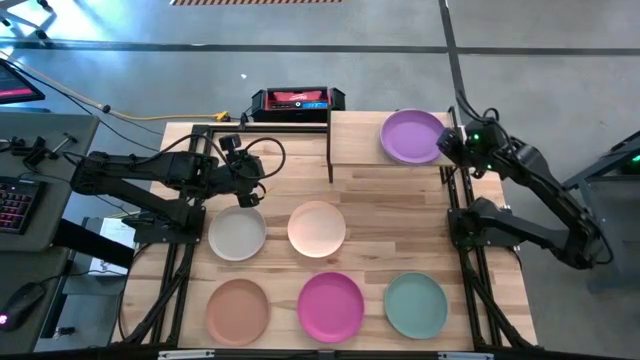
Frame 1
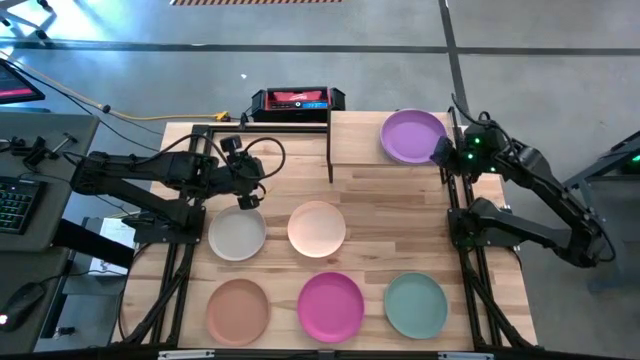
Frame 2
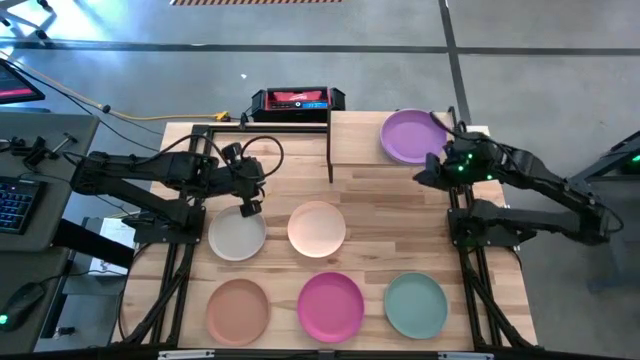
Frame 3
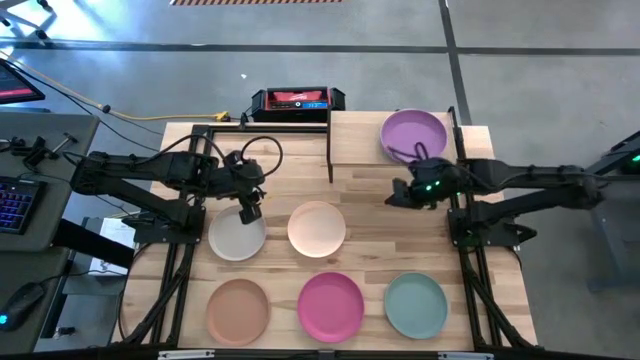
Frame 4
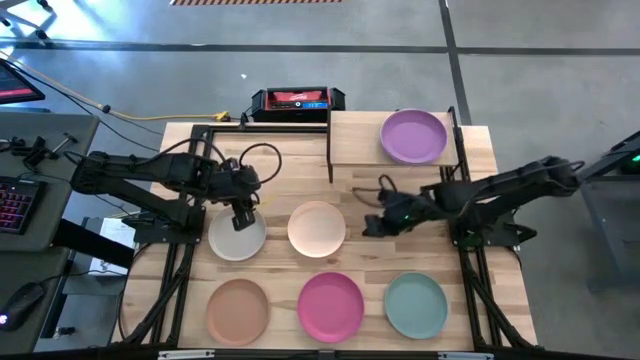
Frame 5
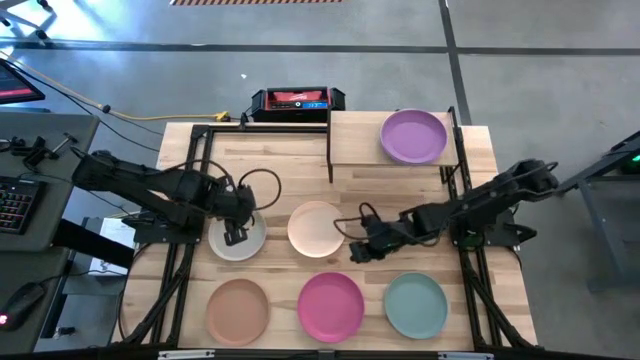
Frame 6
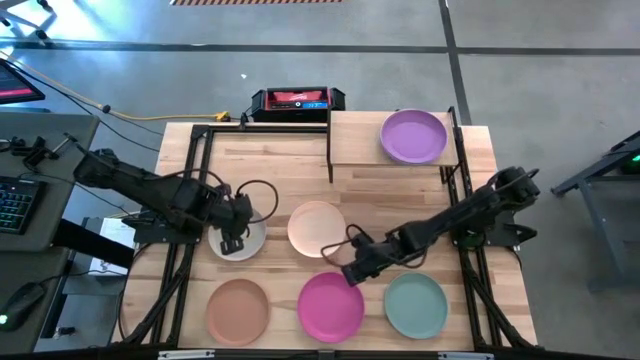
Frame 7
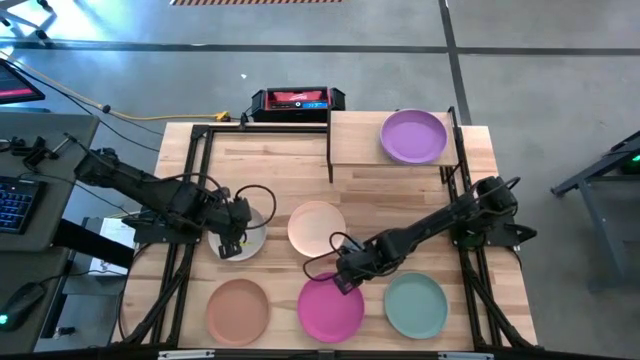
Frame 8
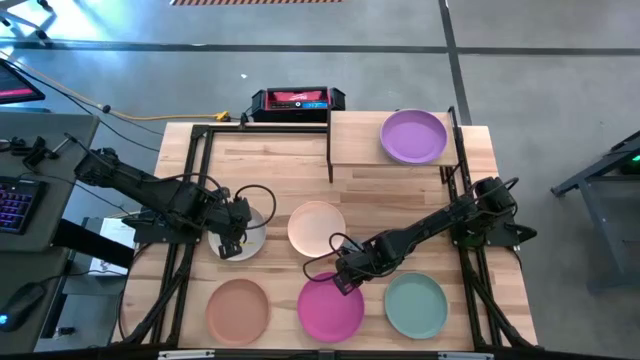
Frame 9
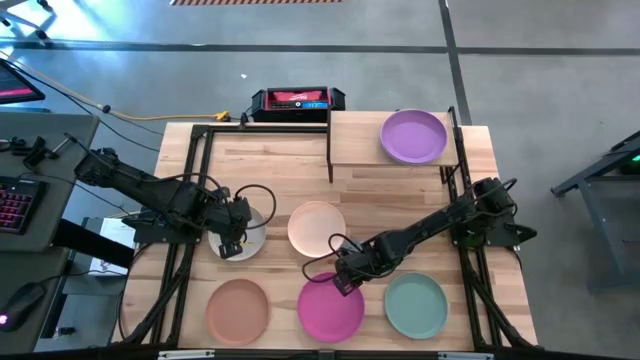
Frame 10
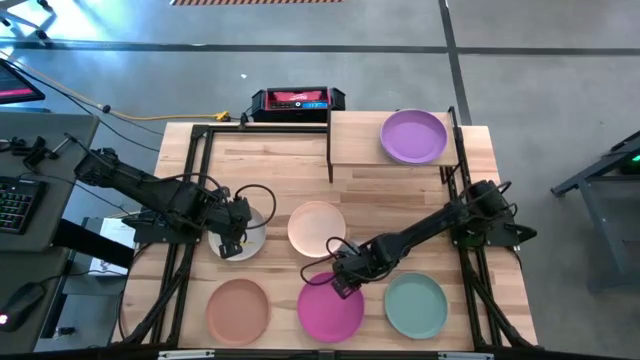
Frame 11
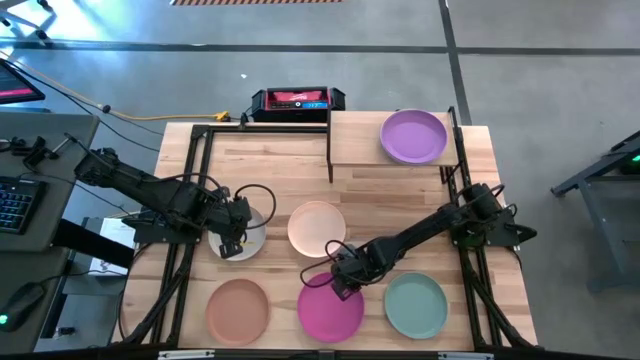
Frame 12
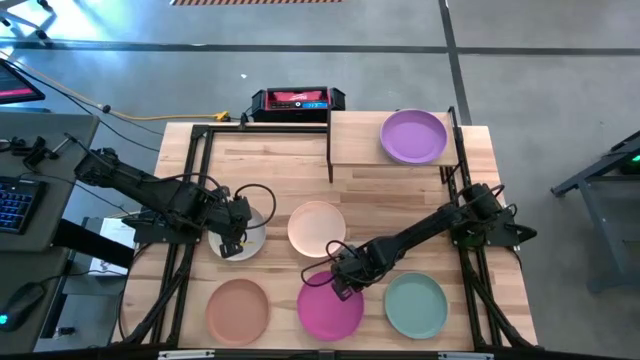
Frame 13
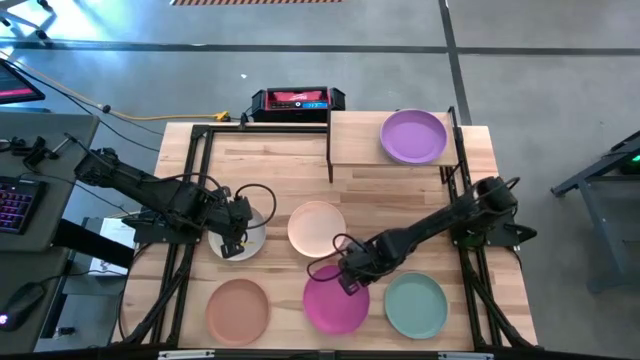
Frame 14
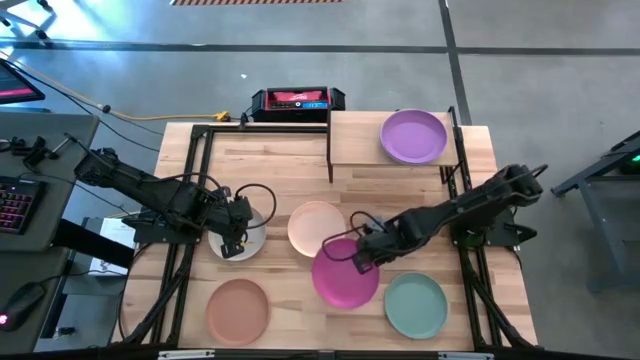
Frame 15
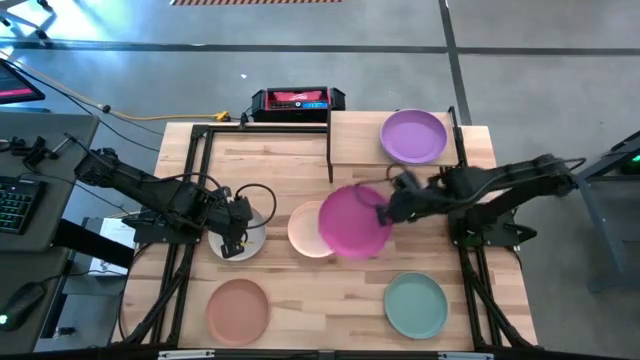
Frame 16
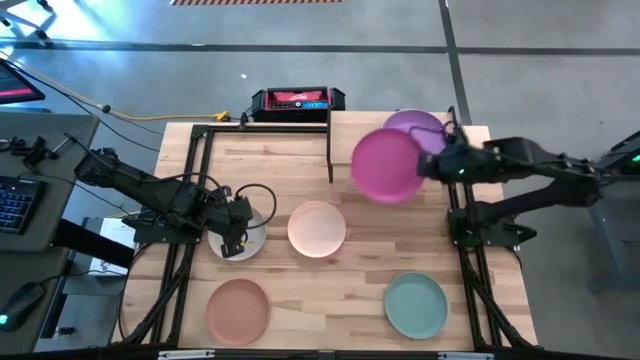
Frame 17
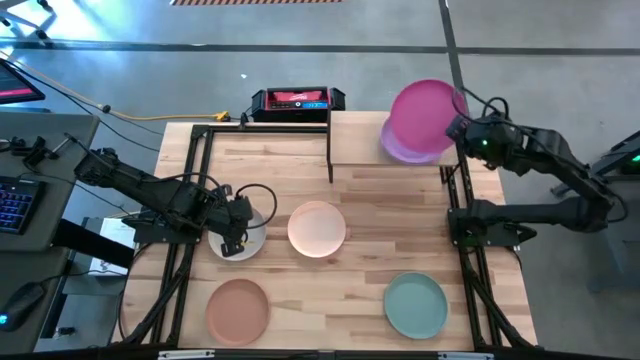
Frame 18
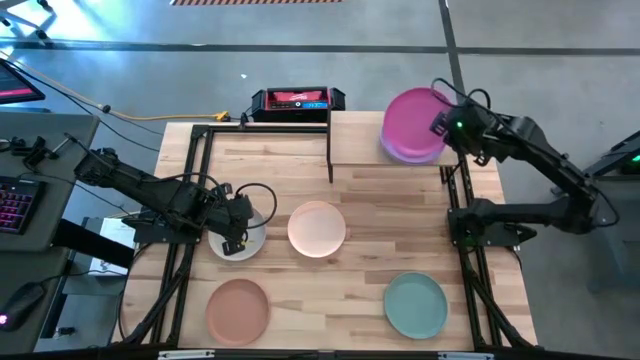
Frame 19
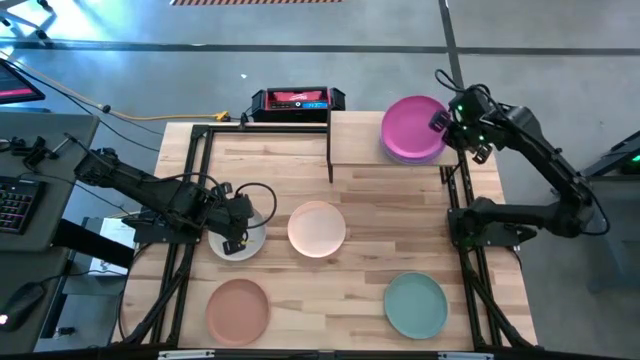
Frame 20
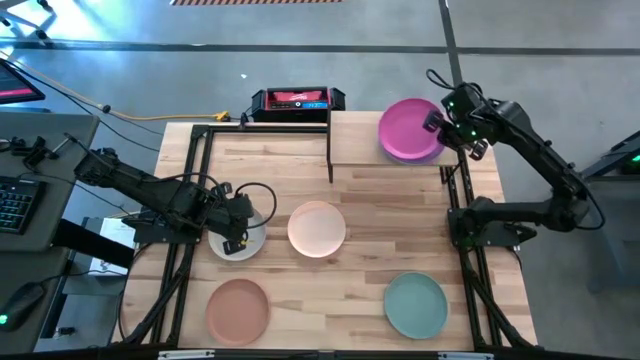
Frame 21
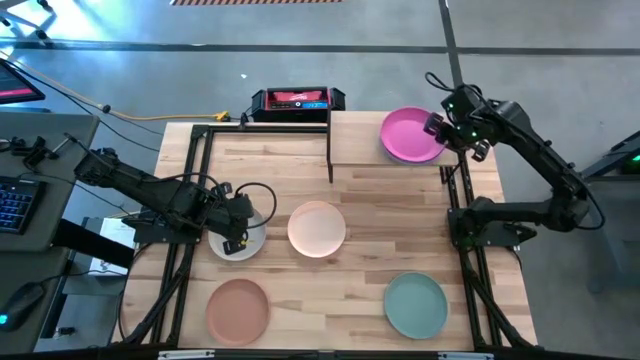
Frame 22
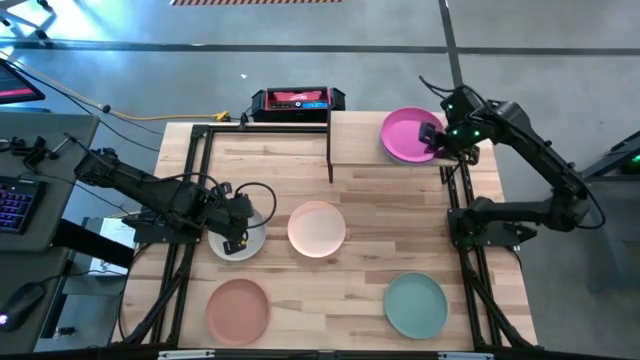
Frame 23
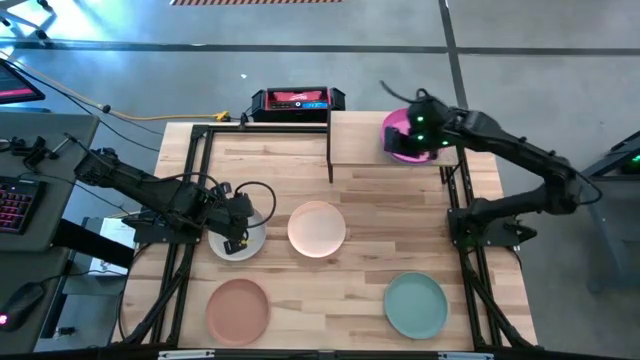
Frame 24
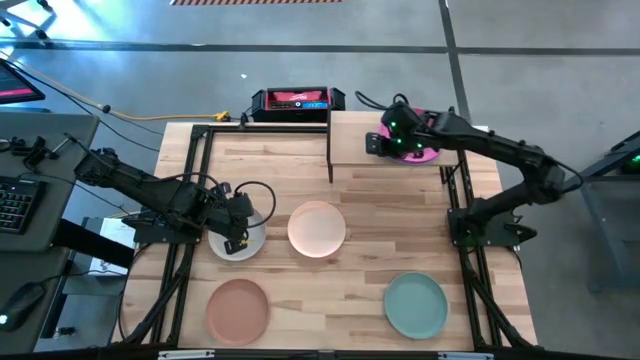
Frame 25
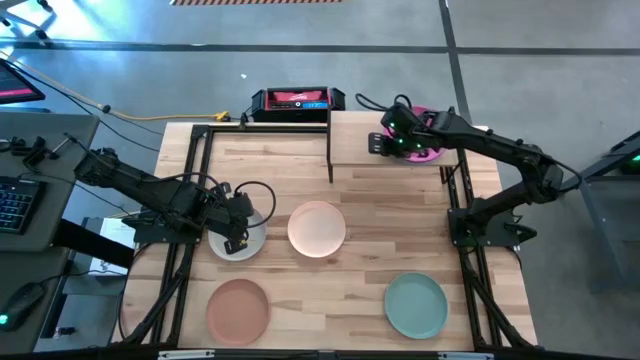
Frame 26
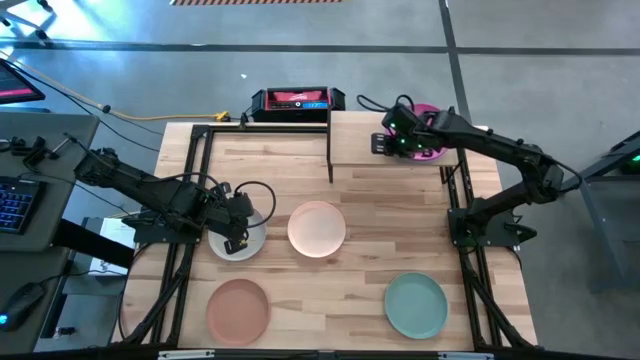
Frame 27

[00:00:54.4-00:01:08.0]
Task: Place and stack plates onto a shelf
Stack the pink plate on top of the purple plate on the shelf

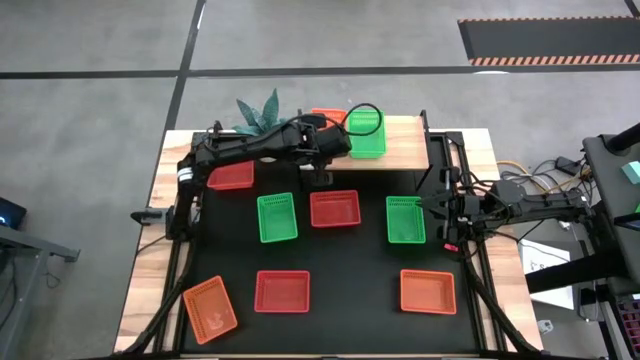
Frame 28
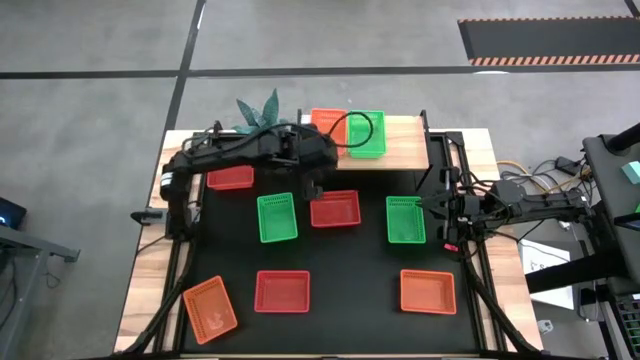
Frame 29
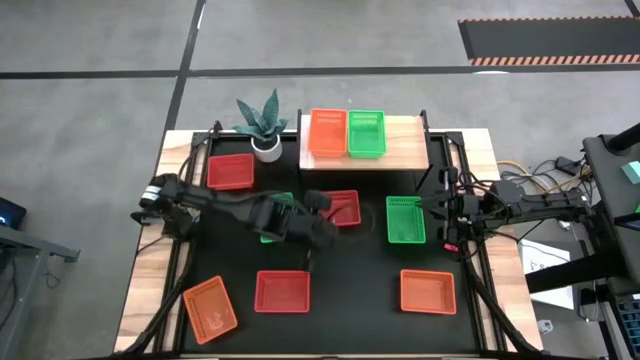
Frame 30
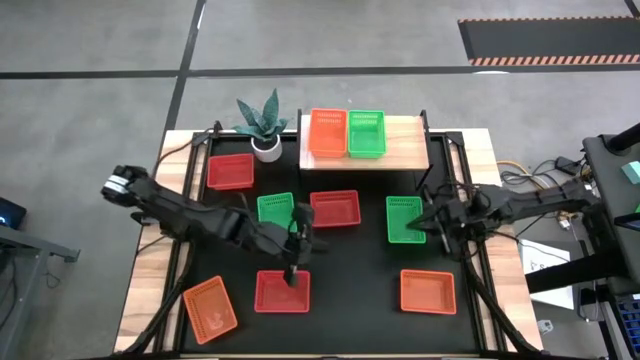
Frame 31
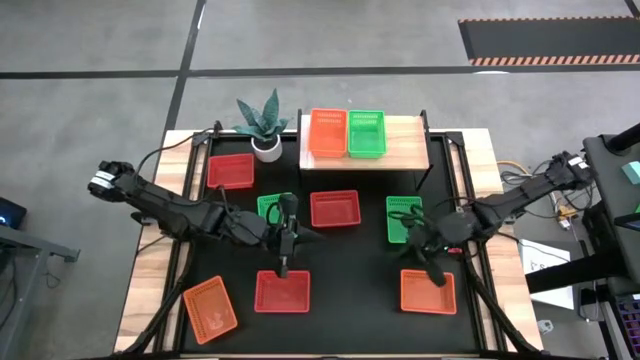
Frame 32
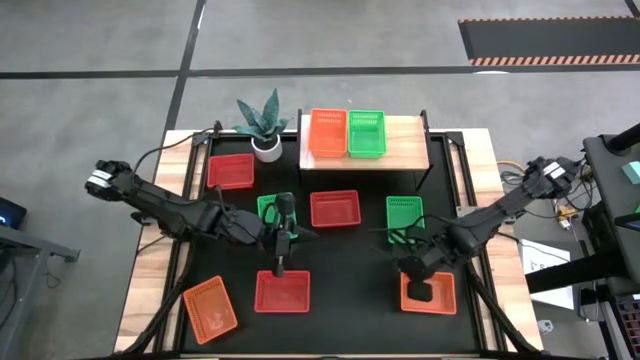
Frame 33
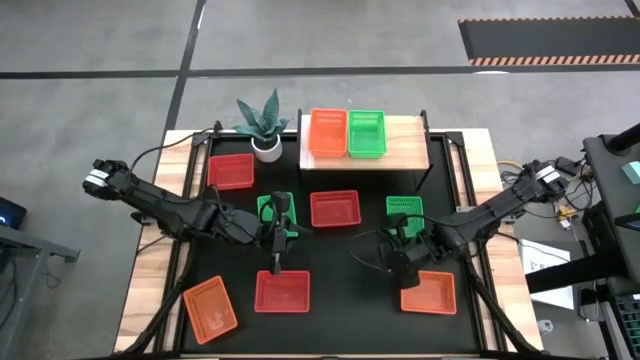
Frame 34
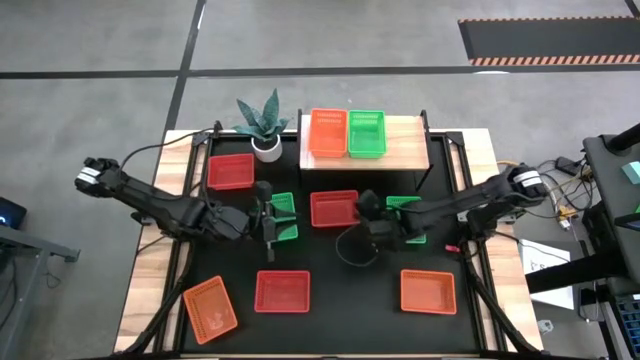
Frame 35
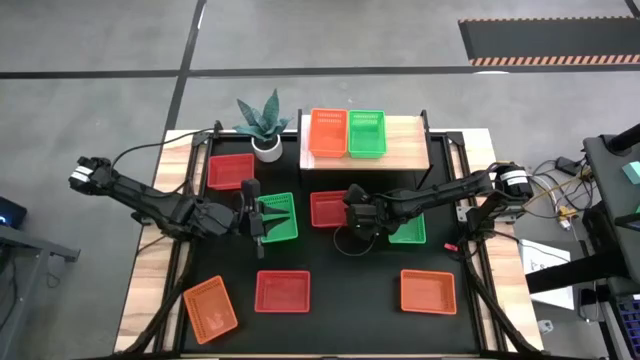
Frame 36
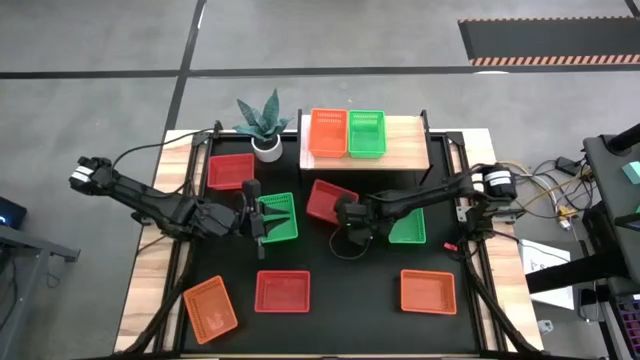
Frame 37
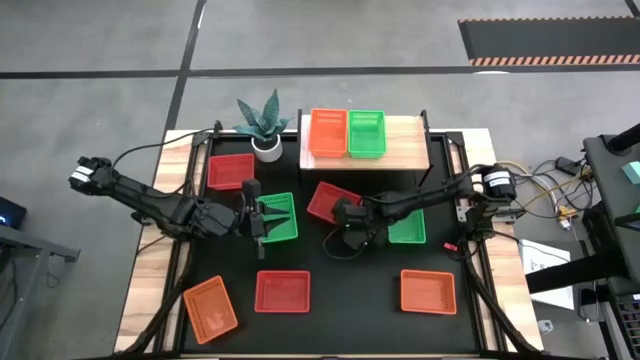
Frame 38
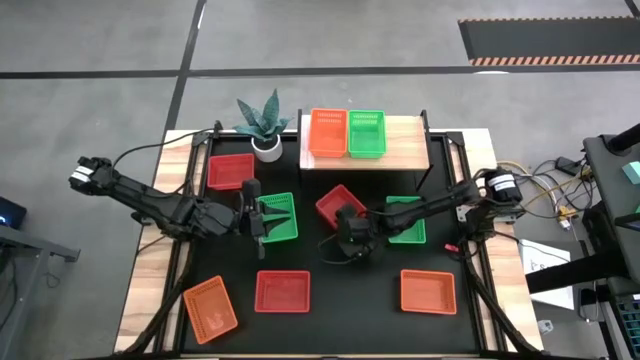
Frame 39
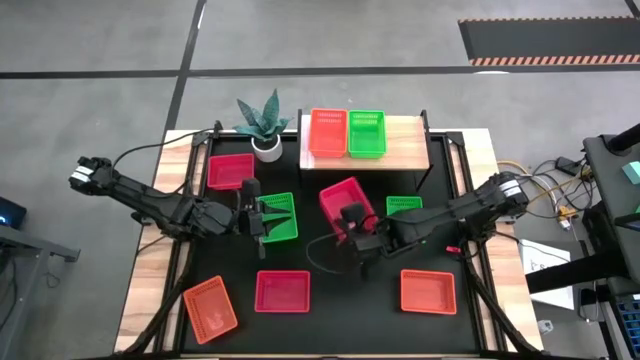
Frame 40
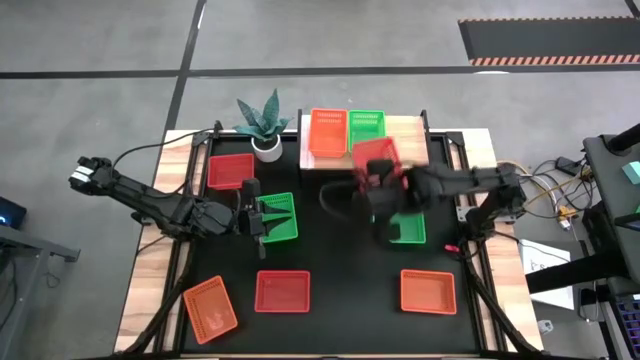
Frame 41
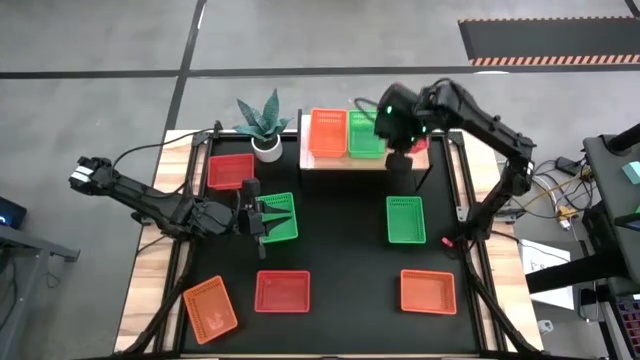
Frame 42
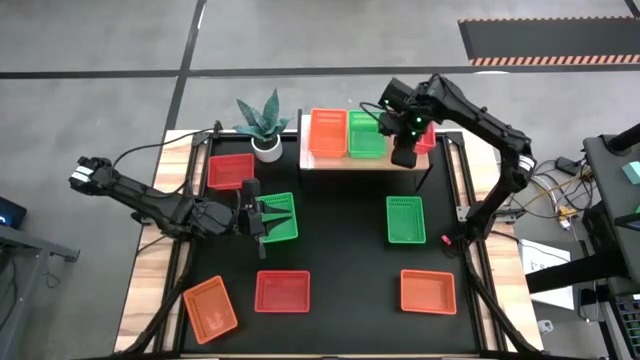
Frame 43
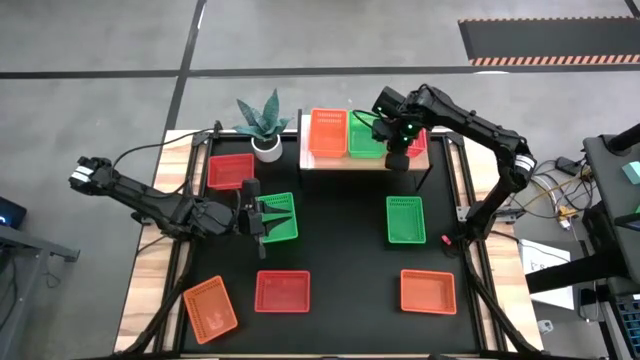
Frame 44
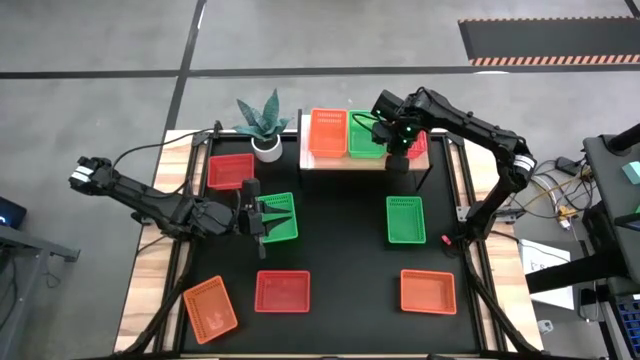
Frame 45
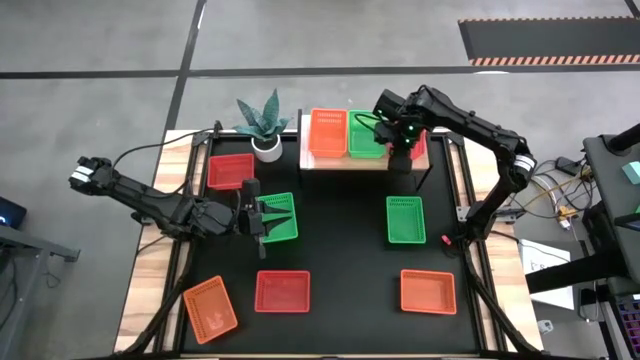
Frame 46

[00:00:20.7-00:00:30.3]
Task: Stack baskets on shelf by color
Put the top right red bin on the shelf
